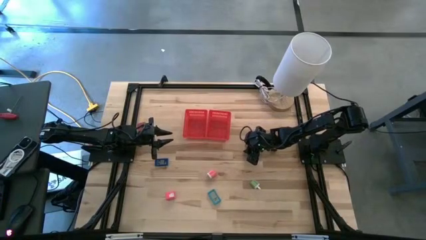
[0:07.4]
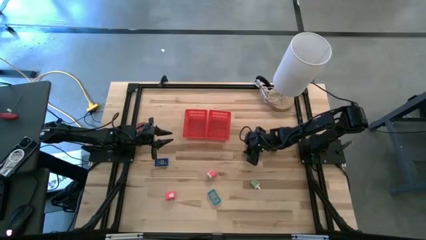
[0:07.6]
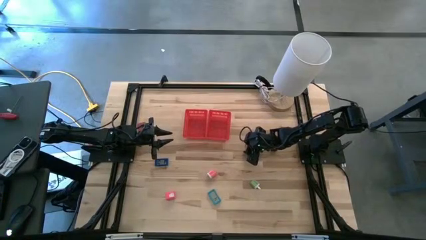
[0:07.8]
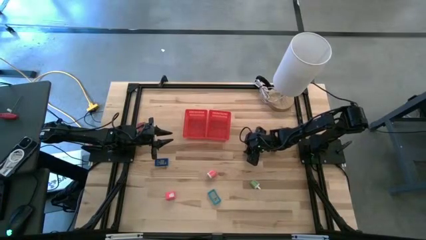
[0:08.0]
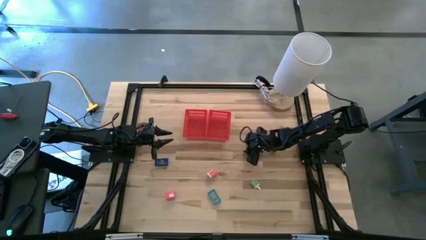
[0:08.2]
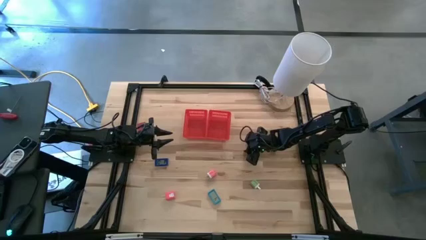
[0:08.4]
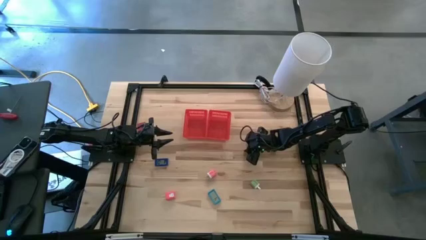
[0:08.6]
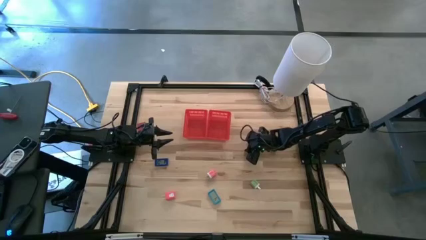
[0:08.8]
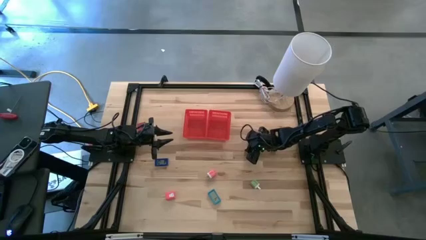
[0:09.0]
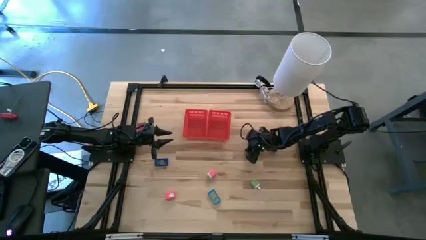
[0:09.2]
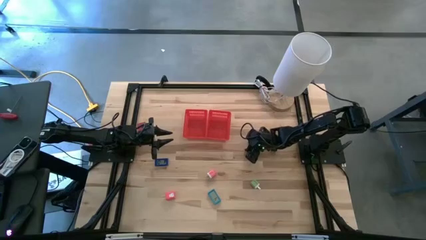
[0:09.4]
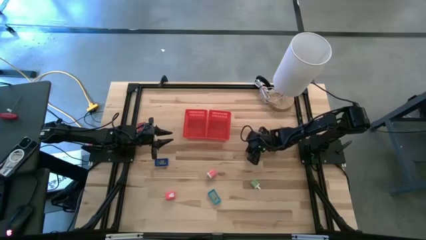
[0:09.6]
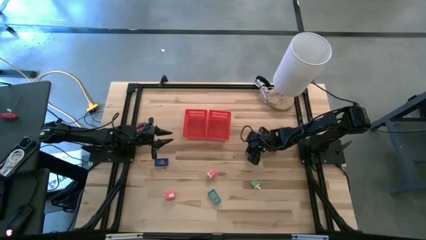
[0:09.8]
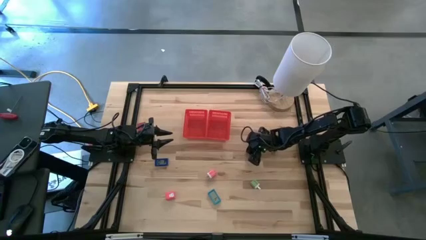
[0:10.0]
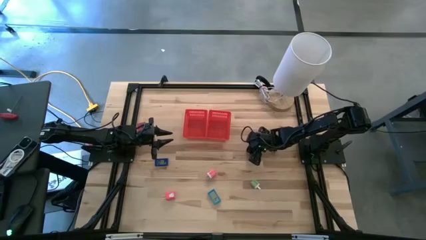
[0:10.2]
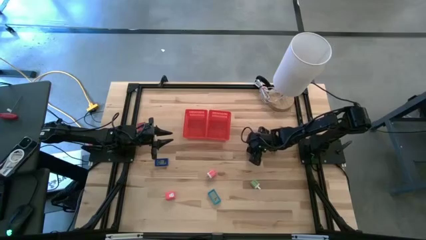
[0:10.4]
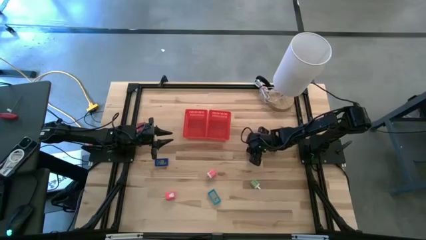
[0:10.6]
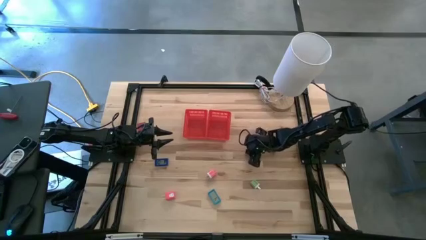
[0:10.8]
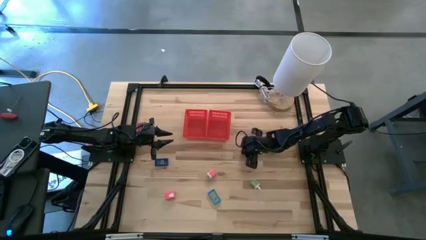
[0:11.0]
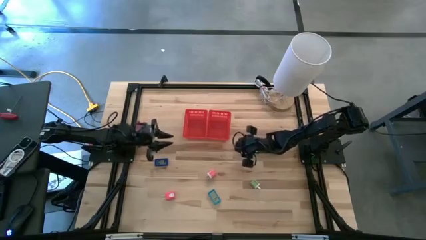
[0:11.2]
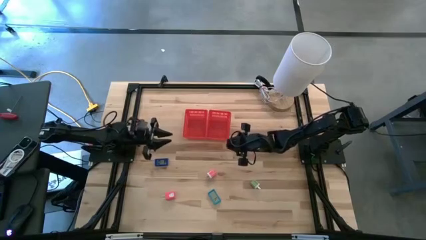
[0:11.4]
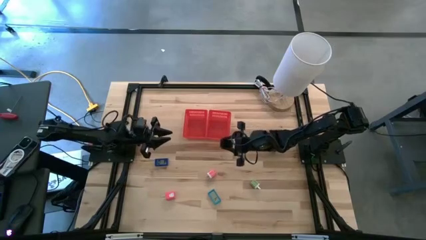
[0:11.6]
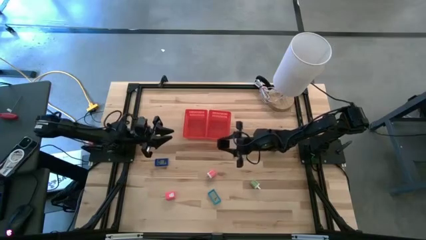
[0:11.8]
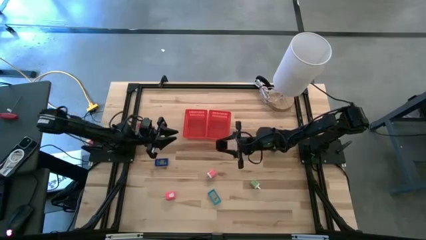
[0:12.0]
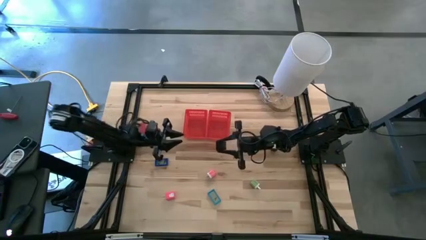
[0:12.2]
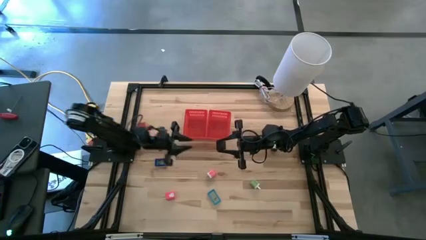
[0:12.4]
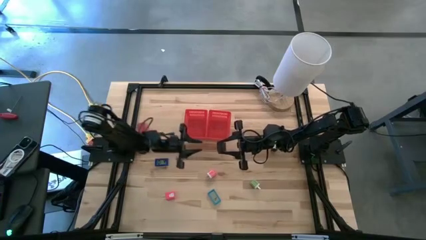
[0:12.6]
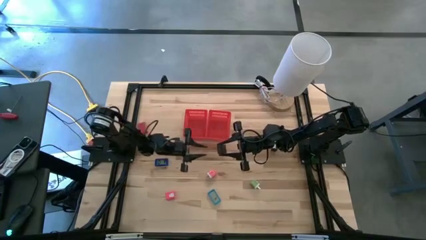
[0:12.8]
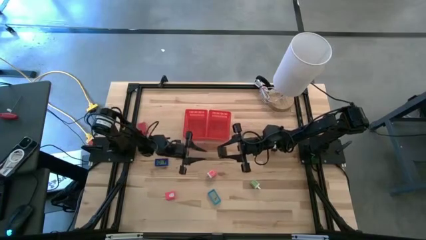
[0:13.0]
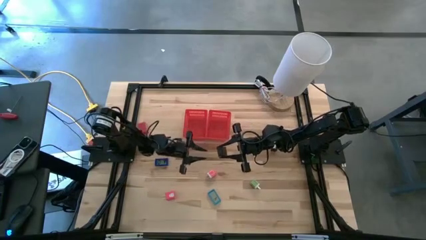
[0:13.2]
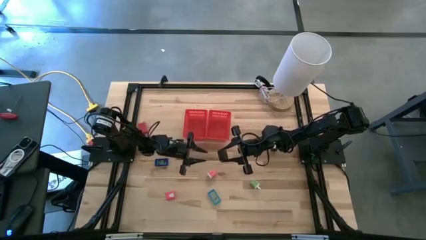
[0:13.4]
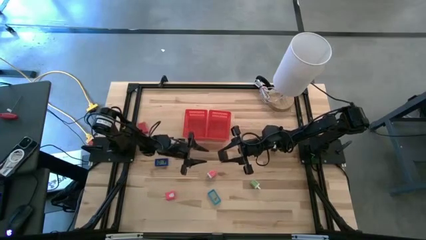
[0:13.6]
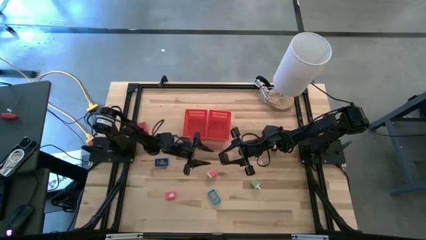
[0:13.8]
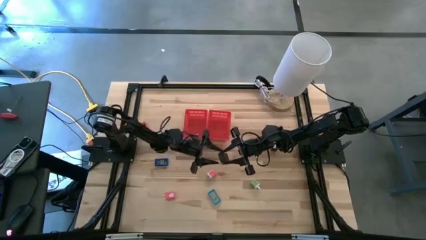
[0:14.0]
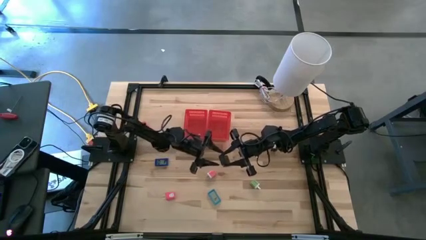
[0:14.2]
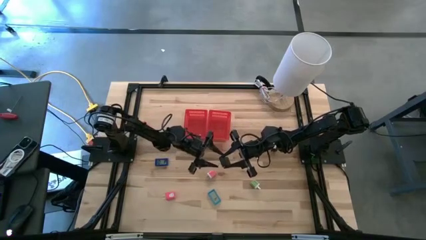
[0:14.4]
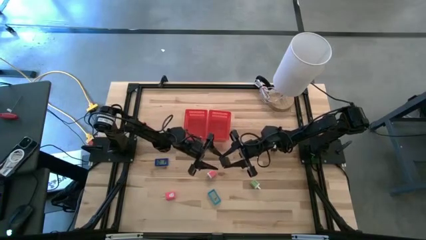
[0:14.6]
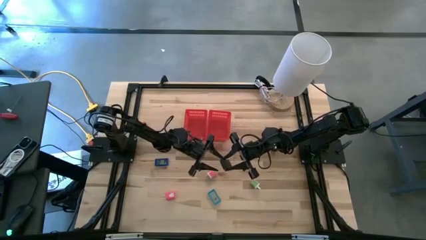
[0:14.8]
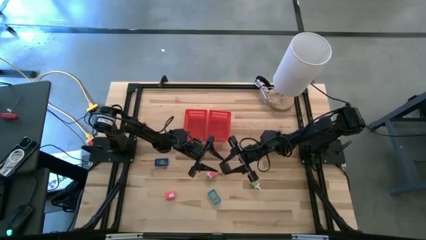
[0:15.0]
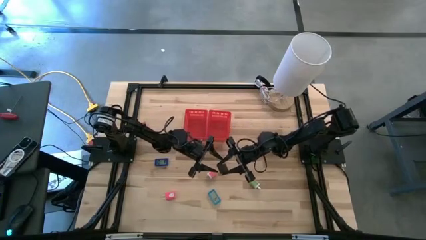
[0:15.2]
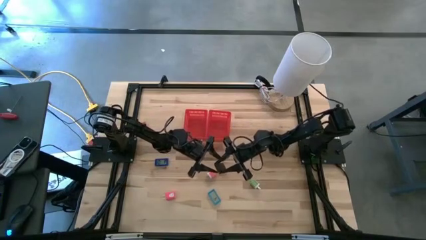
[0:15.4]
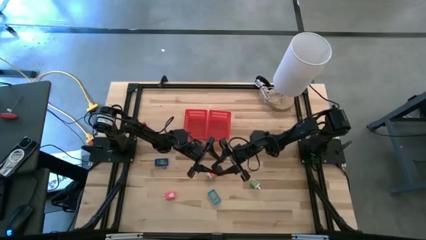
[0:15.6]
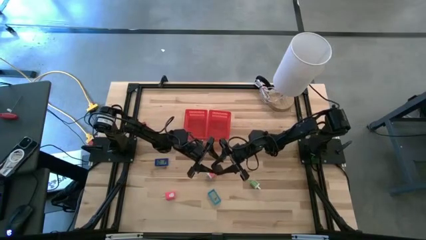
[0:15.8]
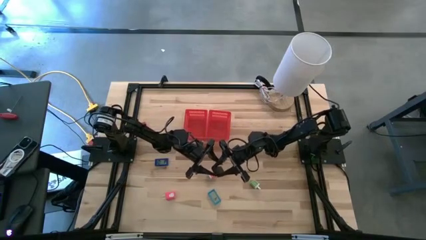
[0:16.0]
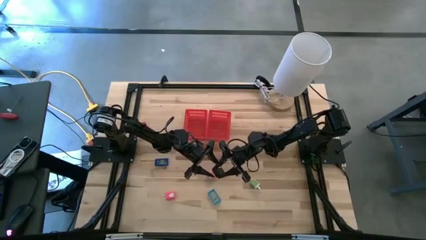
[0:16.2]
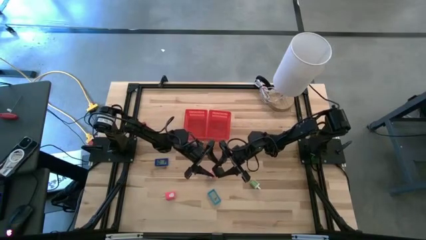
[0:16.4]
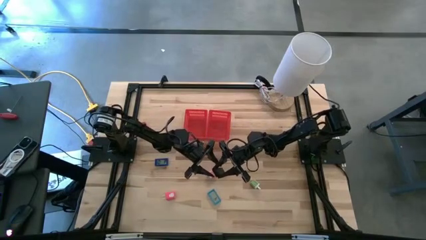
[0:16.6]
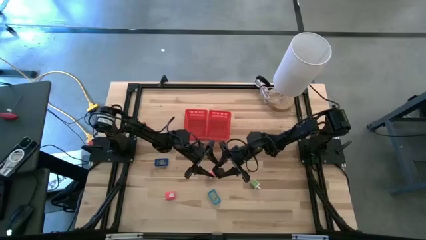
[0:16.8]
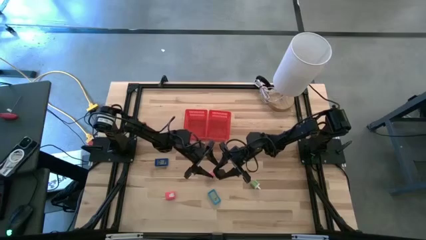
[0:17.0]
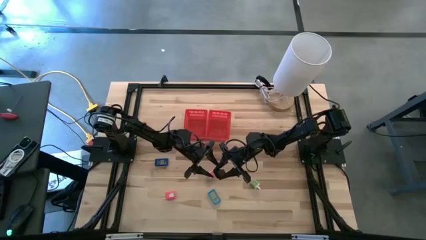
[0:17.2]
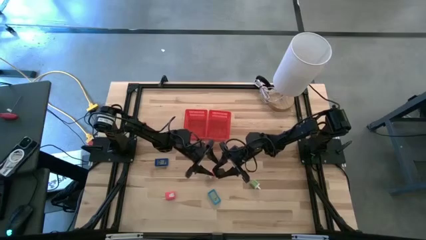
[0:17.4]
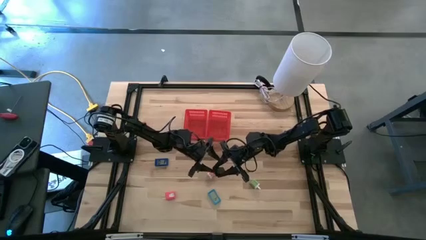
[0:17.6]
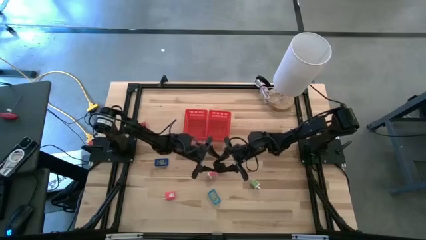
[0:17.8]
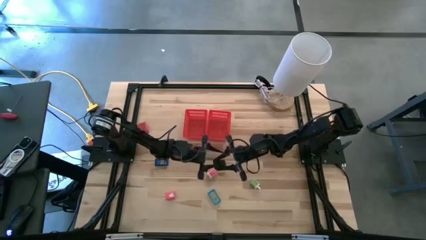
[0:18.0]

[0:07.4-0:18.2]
Task: Pick & Place Office items
Put the black digital clock into the right red bin

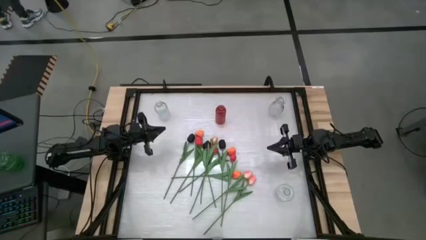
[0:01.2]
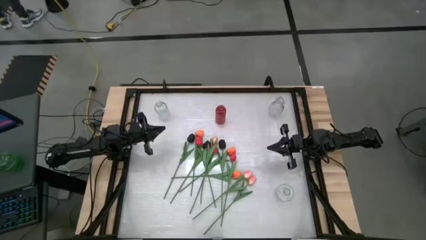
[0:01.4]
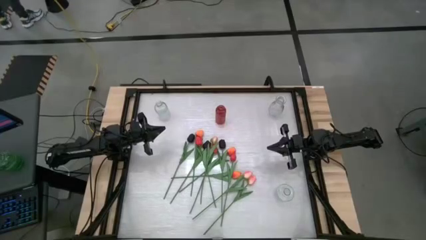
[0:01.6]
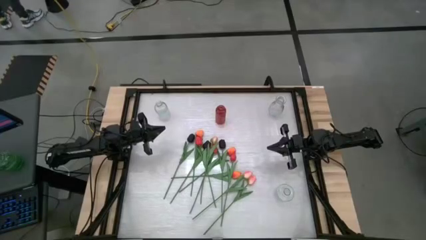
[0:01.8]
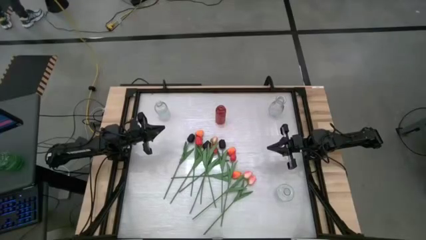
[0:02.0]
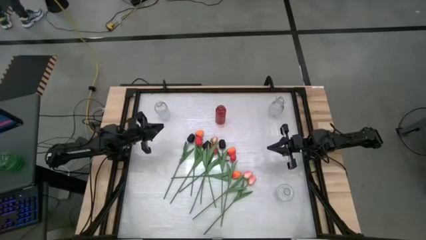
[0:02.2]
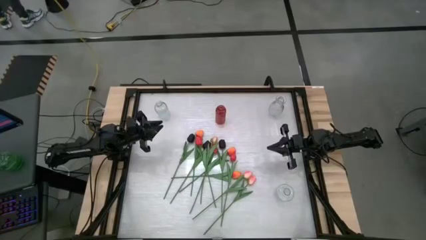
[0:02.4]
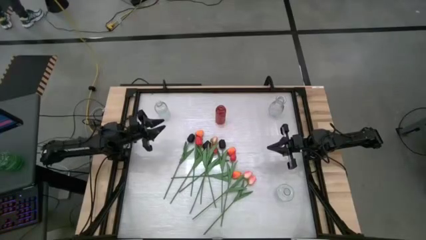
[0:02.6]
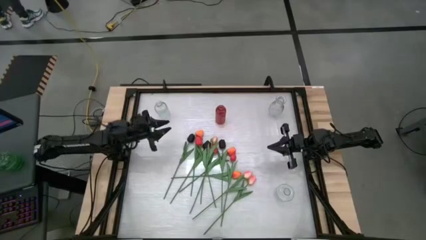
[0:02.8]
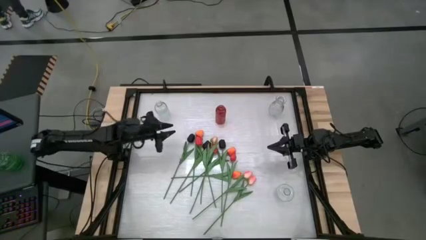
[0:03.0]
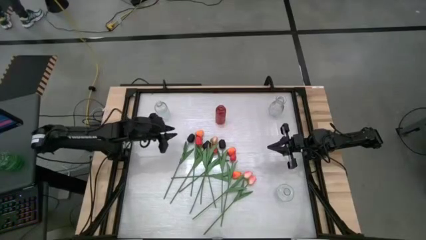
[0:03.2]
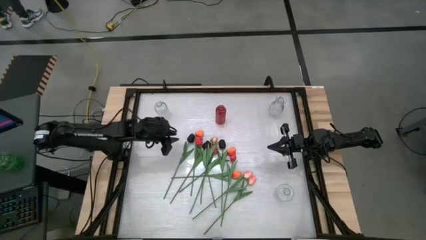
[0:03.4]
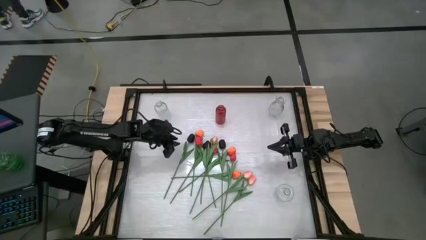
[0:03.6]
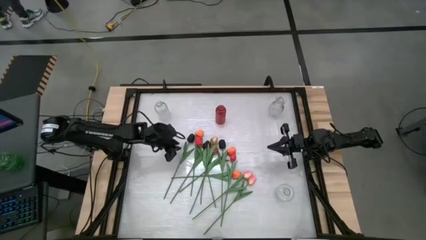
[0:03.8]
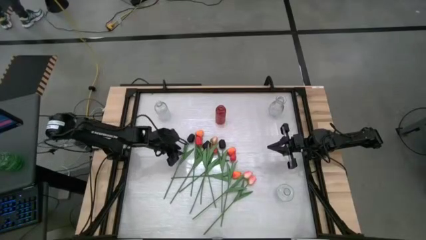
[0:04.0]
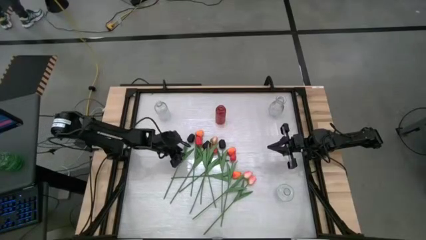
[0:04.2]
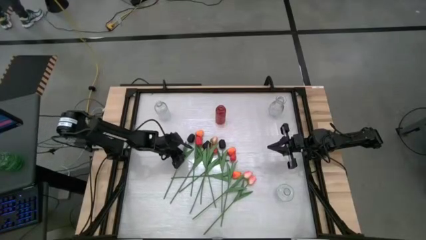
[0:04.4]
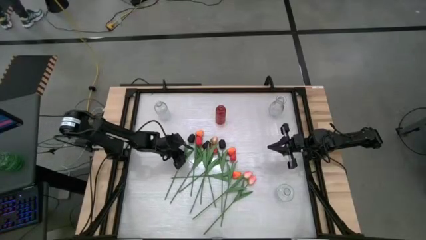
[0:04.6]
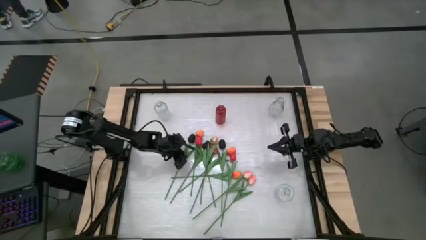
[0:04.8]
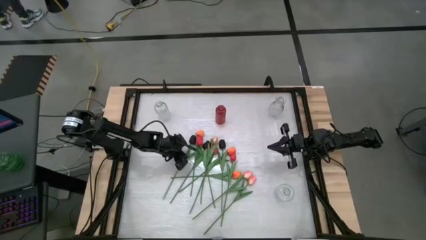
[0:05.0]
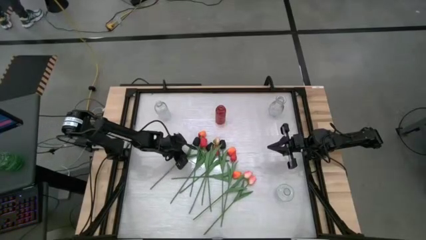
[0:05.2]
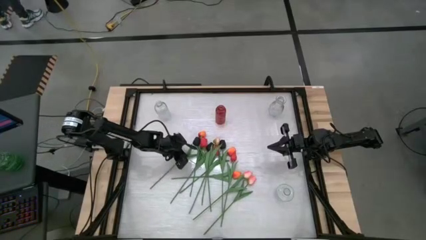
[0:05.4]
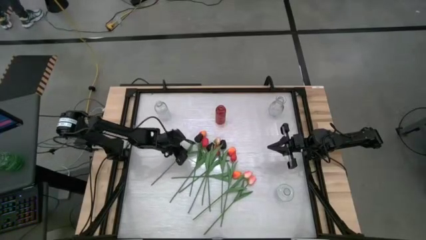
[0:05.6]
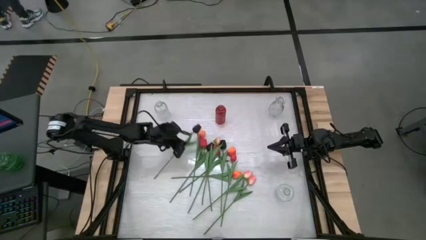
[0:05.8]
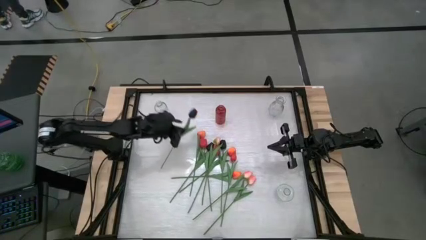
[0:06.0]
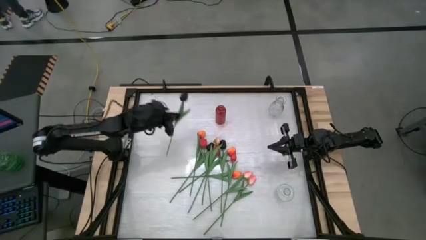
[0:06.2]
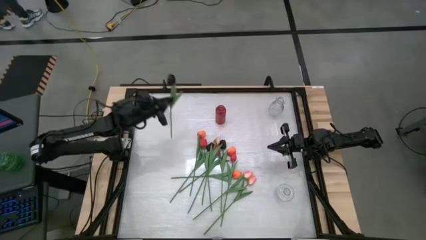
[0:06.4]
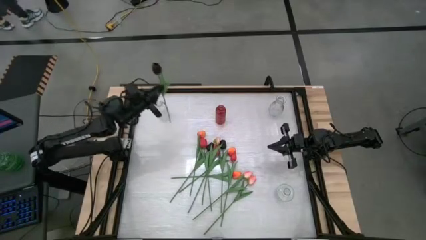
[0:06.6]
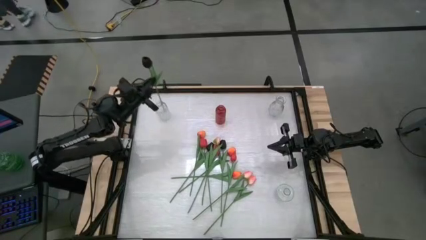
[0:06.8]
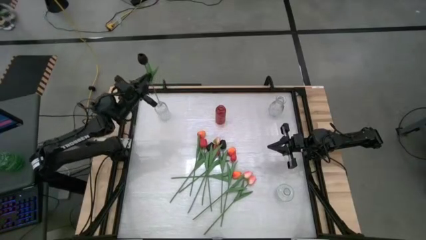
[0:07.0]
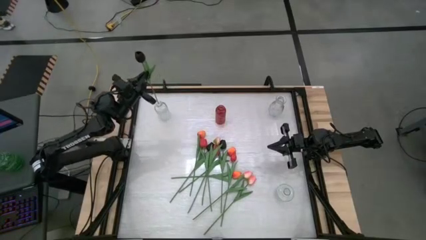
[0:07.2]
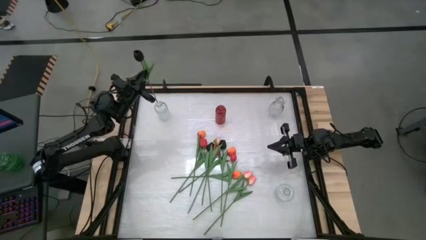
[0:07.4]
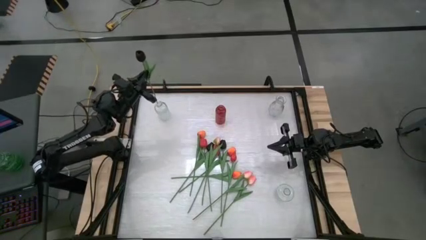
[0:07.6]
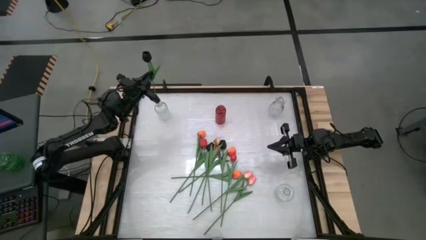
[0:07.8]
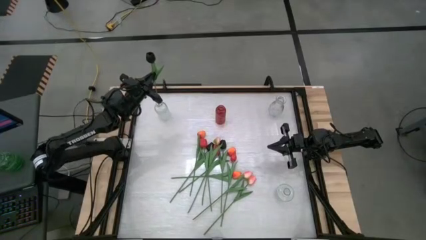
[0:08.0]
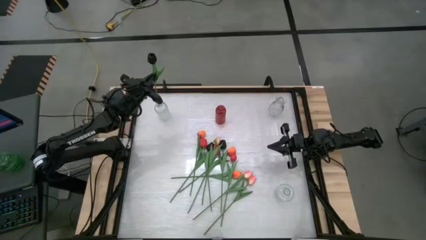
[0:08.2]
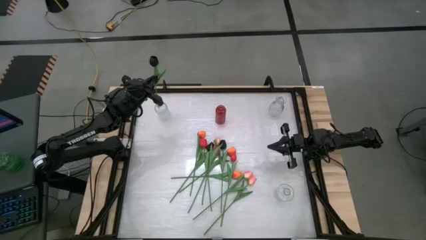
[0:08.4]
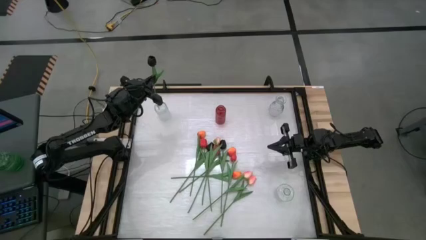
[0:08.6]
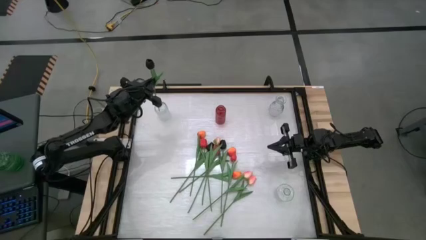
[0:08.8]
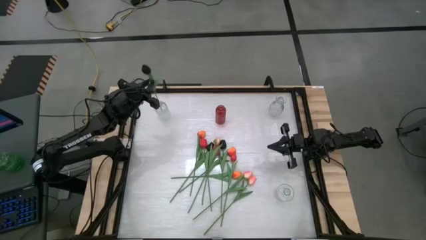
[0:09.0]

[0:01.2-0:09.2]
Task: Sort flowers into vase by color
Put the left black flower into the top left transparent vase
